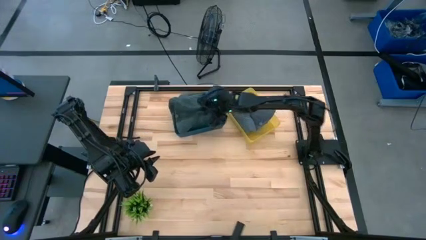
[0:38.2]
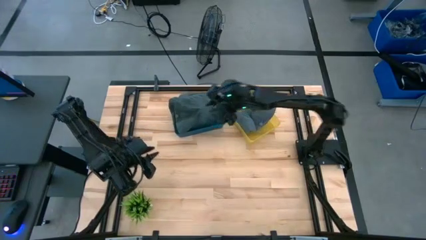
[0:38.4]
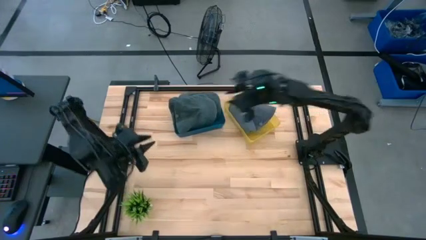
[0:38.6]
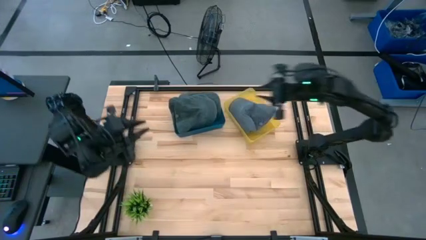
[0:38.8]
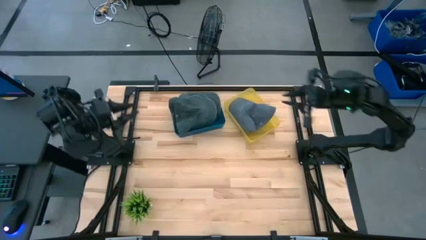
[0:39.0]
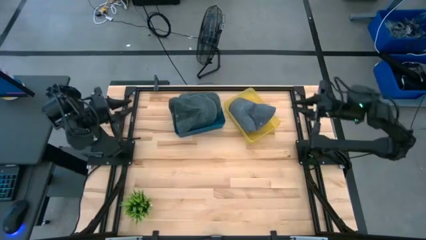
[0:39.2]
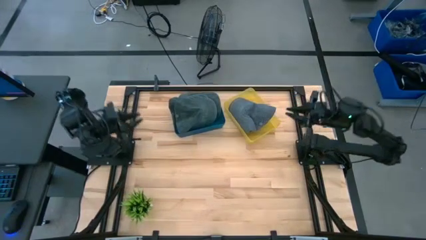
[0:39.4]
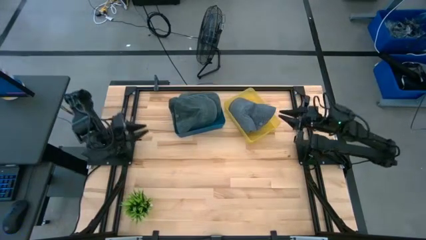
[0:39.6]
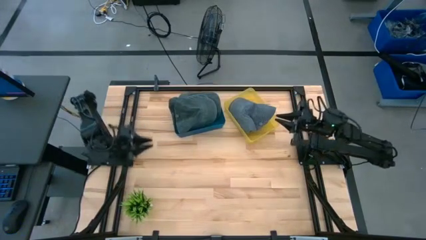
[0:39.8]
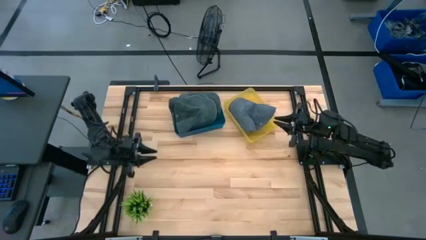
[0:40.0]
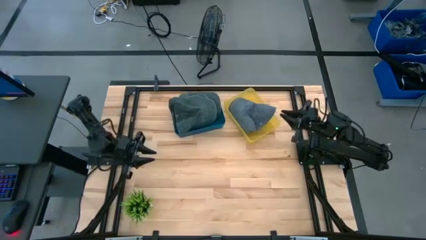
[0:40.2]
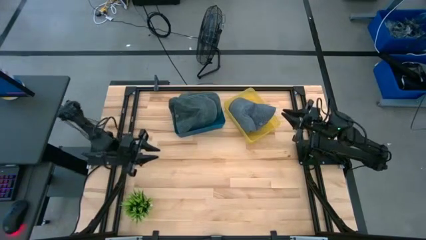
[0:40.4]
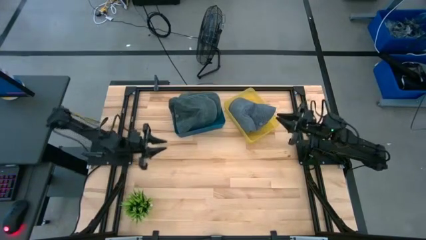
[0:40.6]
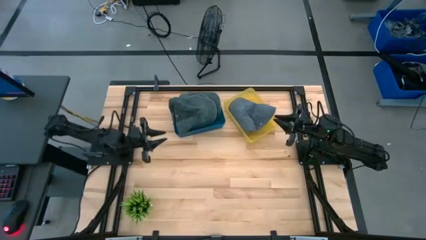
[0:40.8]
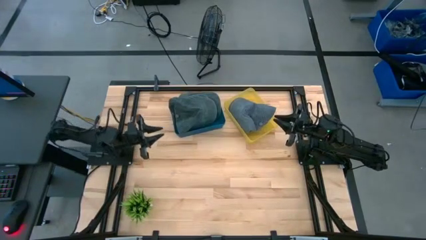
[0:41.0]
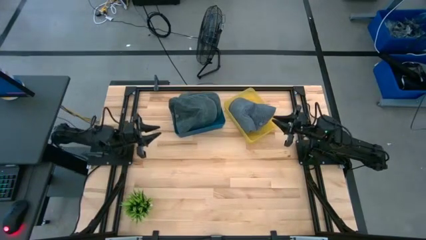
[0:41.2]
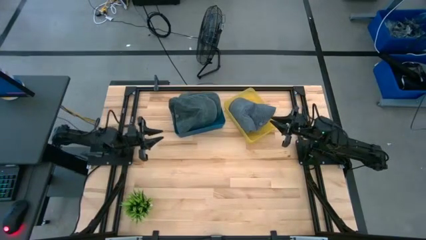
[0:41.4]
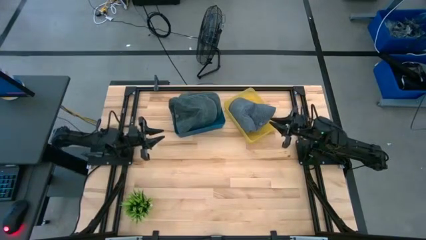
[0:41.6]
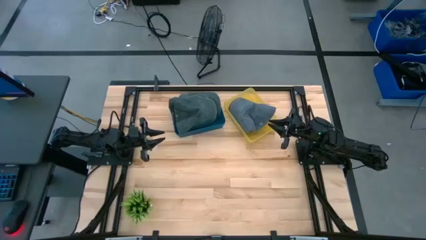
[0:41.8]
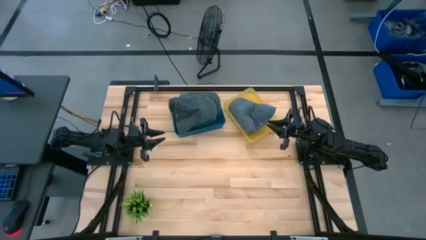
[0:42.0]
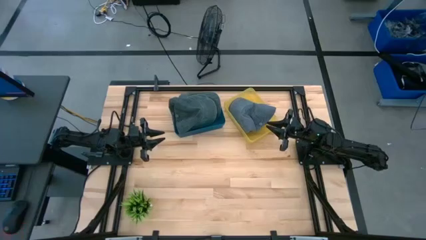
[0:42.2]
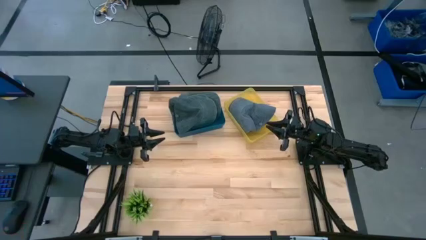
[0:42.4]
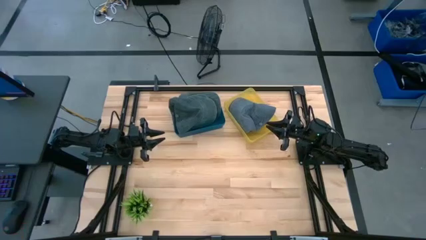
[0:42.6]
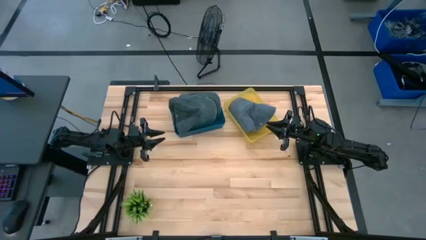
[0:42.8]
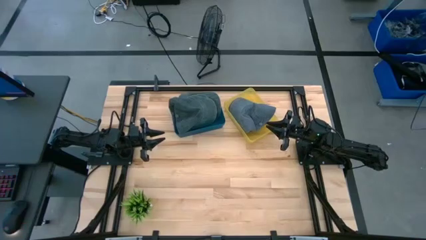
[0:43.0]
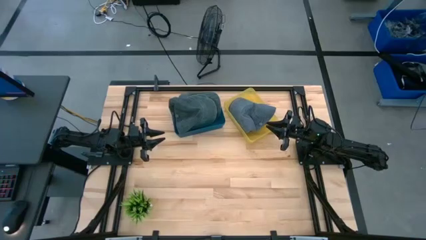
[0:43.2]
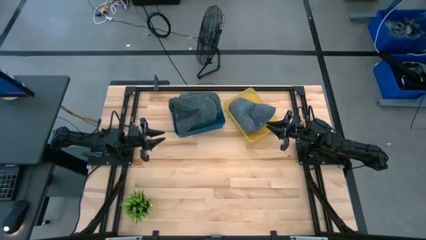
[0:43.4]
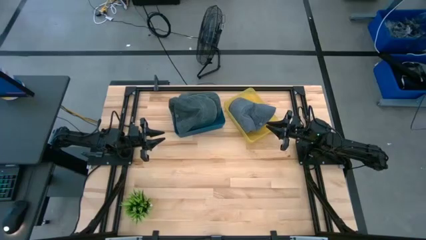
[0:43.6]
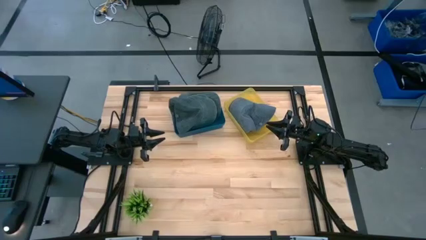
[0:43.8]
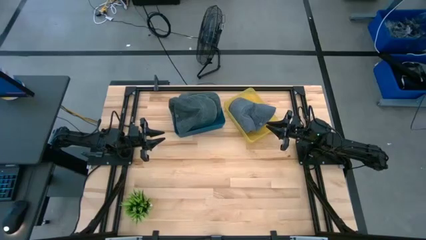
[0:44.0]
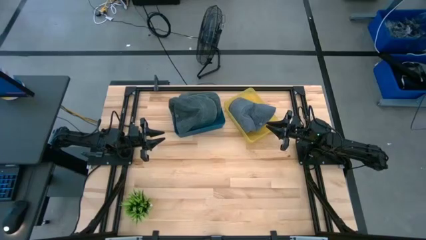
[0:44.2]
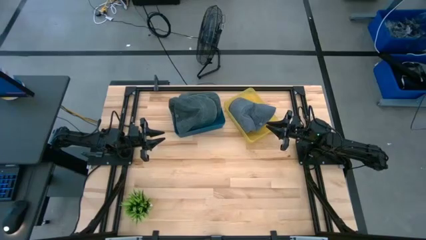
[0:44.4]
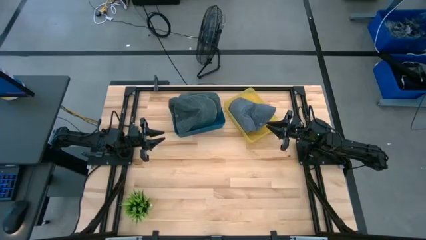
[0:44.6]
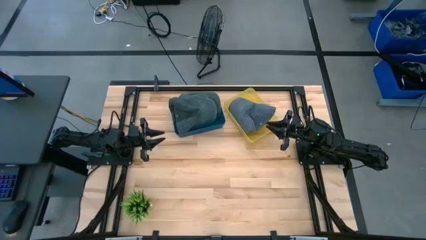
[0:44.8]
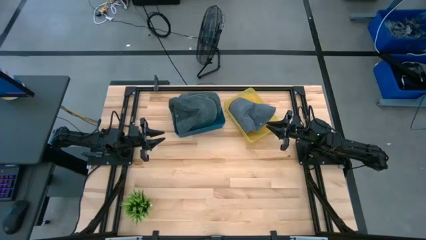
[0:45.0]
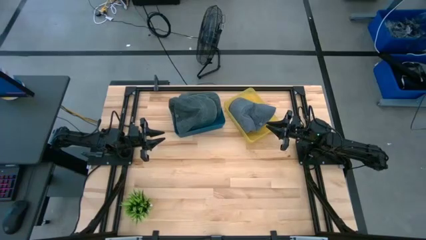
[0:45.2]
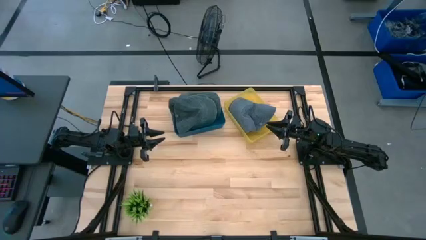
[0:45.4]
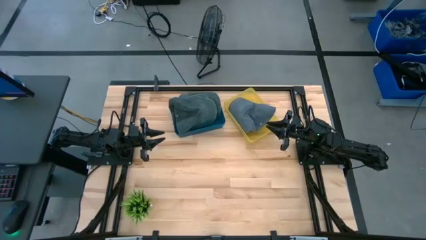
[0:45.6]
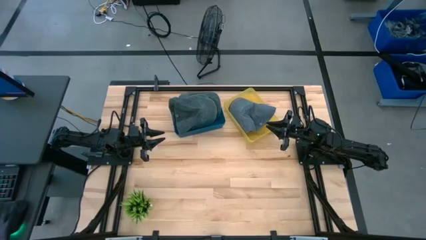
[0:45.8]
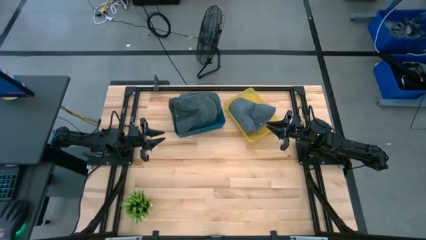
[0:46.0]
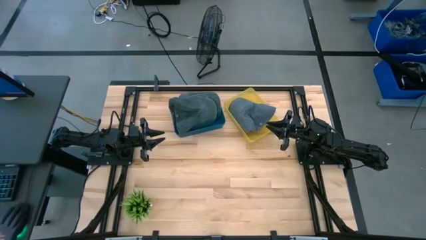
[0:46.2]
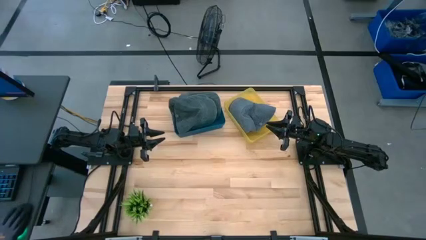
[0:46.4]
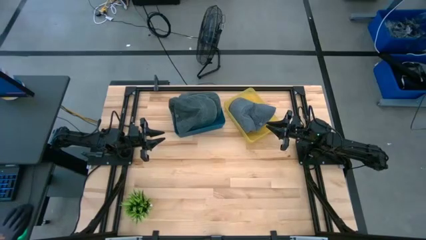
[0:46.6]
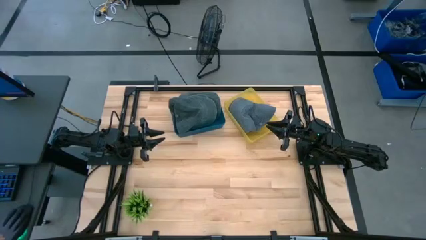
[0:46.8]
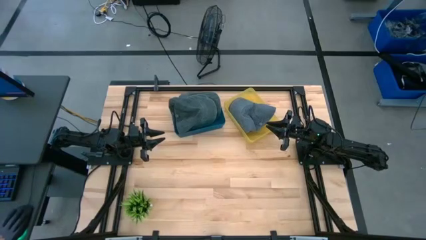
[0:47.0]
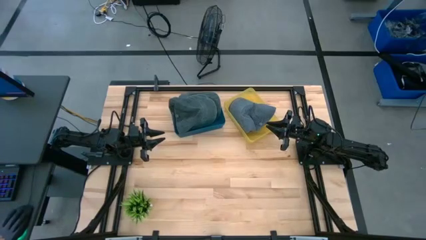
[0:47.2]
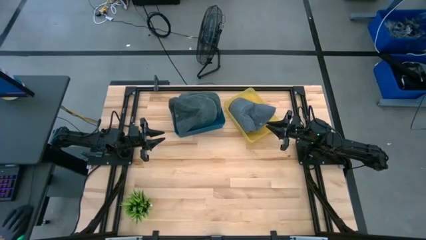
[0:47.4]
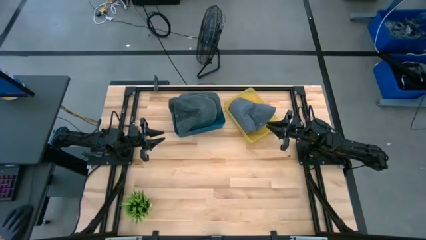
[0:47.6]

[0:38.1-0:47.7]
Task: Pick & Place hat
Return to Home Position

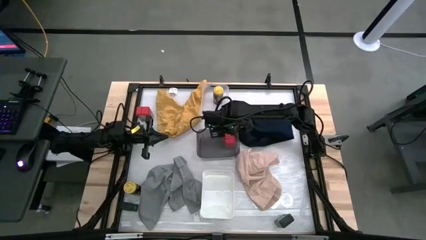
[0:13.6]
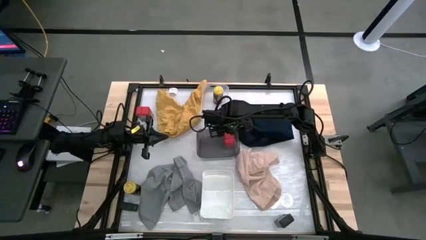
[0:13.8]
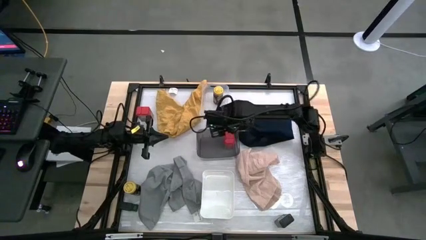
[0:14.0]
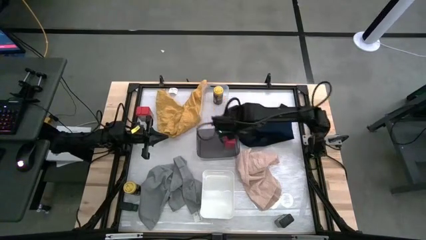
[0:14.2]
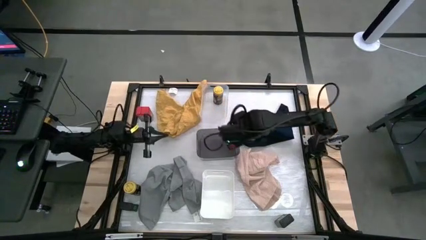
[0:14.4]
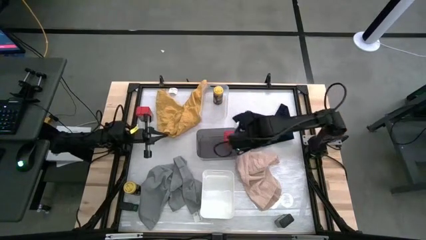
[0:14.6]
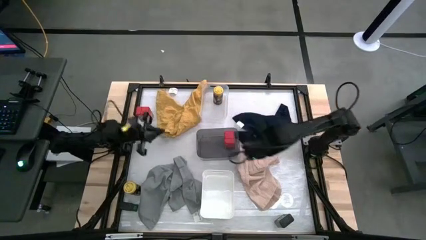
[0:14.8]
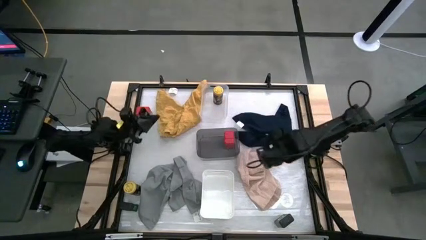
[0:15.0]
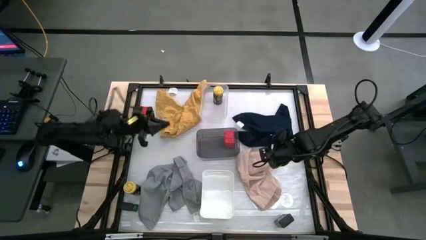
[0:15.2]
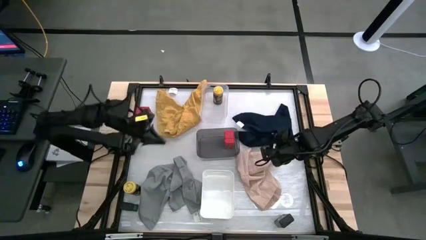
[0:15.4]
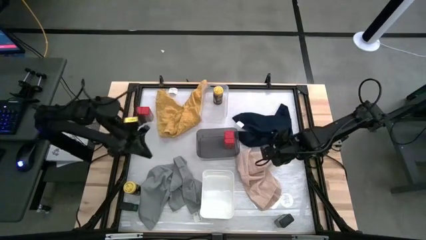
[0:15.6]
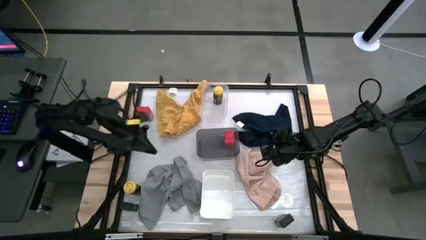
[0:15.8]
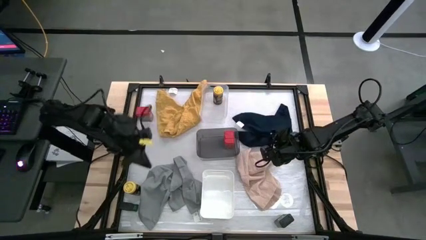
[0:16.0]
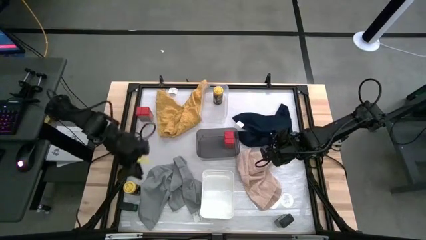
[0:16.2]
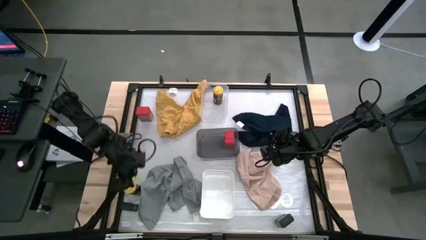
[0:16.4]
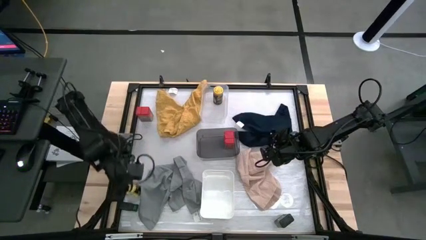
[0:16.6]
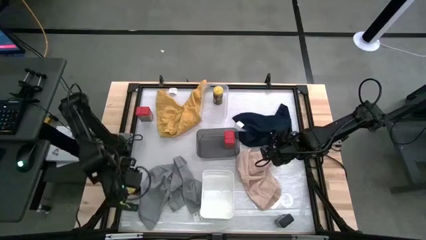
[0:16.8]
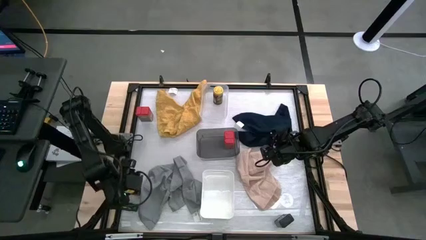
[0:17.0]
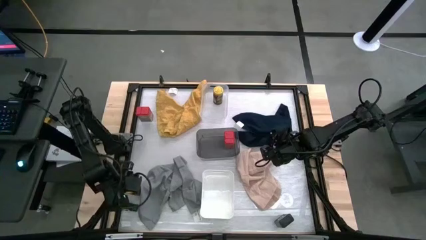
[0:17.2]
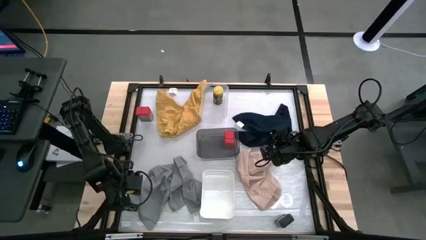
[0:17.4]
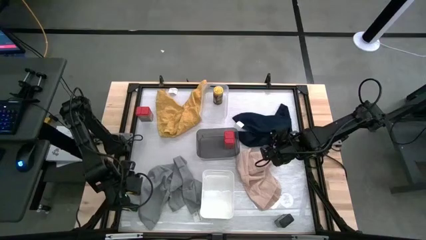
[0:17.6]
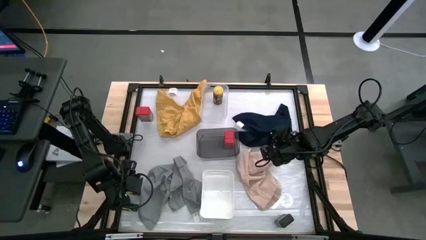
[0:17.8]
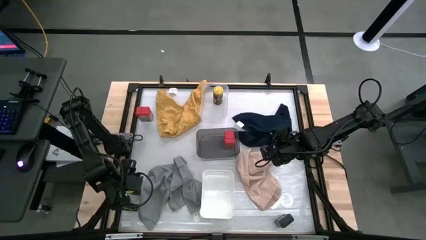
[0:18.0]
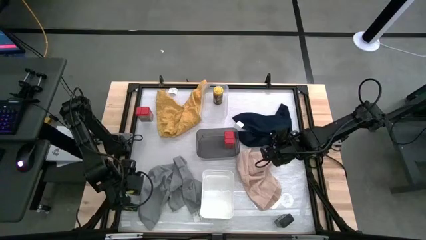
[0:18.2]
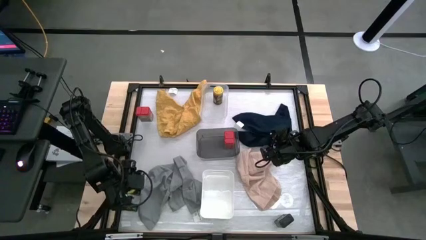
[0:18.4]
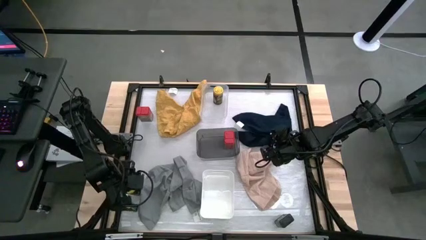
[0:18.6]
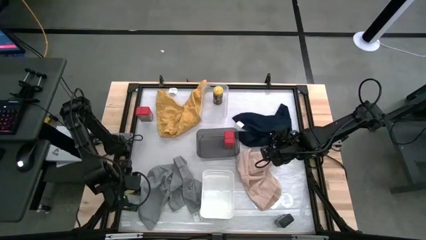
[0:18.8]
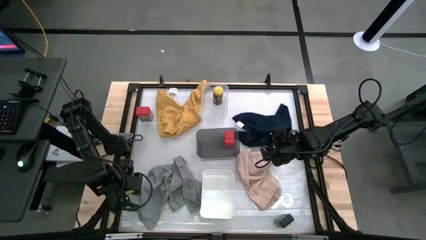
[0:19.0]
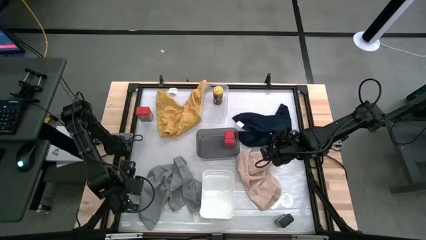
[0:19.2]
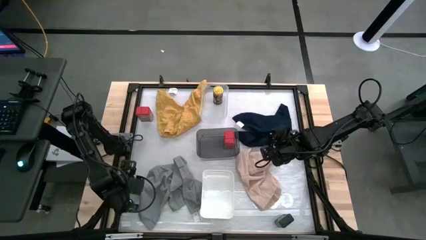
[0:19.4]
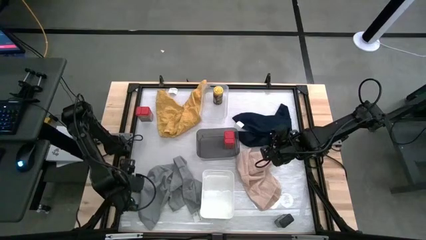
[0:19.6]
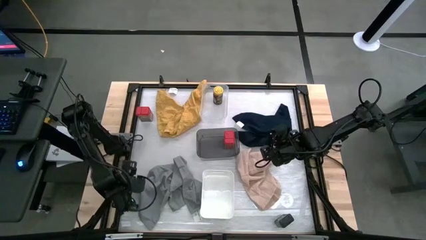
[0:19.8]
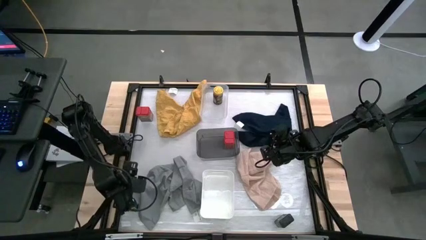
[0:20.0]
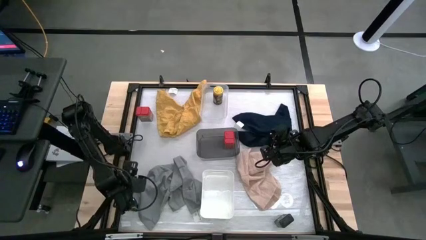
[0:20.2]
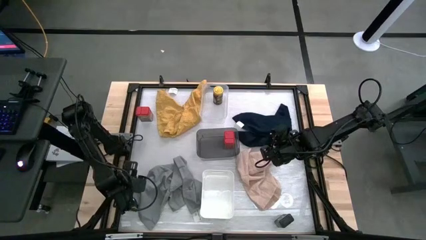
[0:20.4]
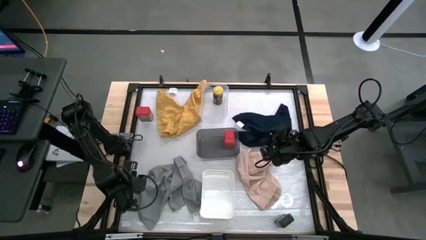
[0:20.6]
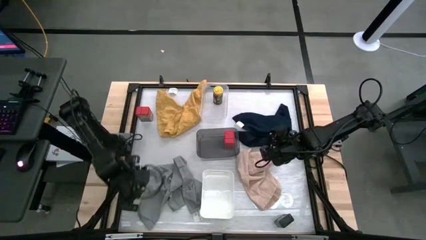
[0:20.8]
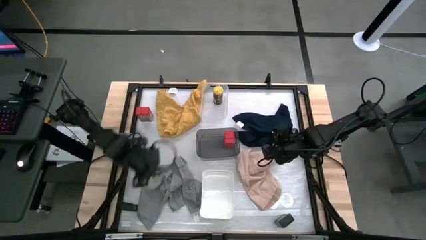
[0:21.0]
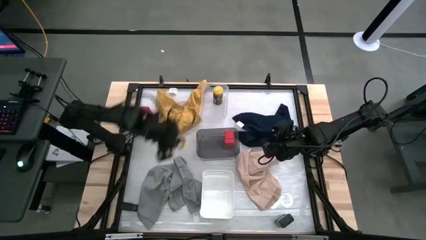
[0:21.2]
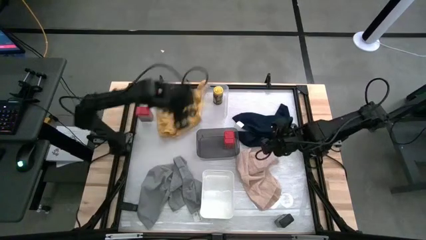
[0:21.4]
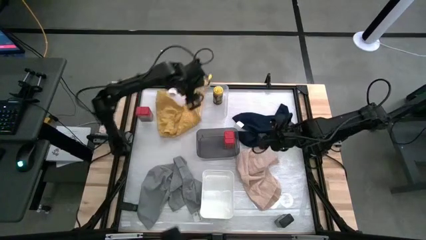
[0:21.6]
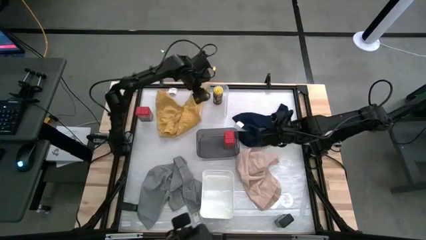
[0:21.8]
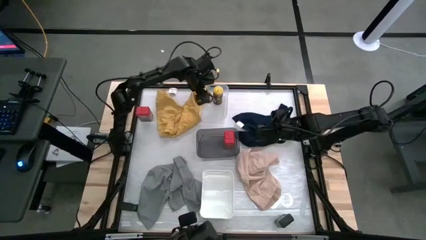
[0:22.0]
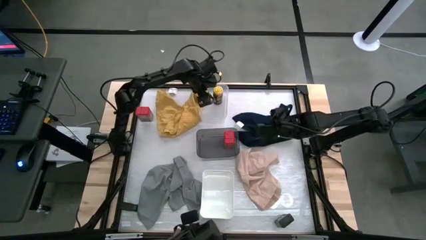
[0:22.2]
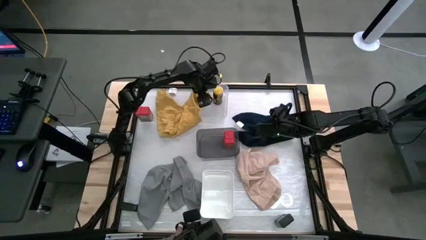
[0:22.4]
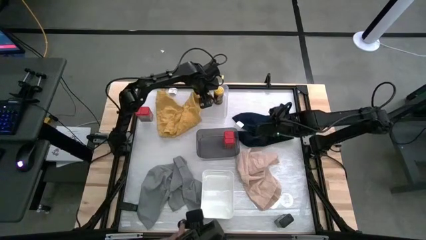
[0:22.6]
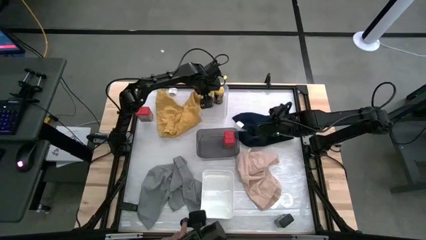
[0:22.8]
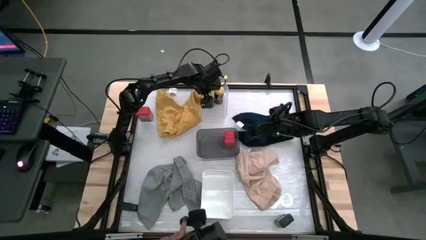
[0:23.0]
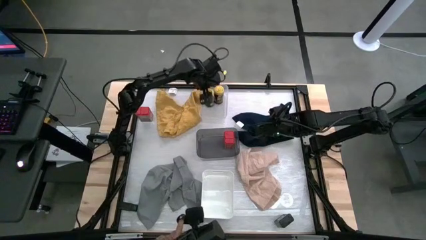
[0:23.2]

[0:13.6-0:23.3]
Task: Sort spices by type
Put the yellow spice bottle into the transparent bin
